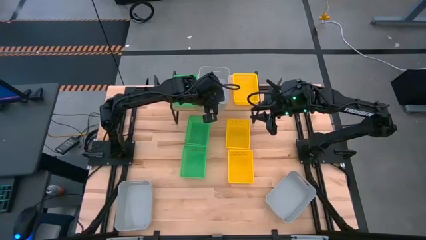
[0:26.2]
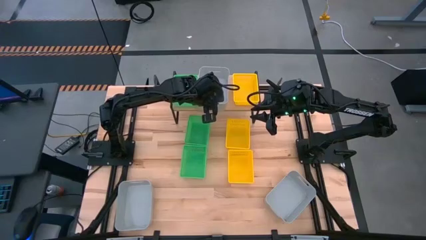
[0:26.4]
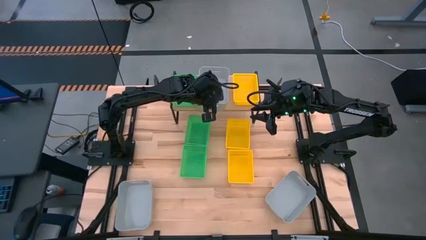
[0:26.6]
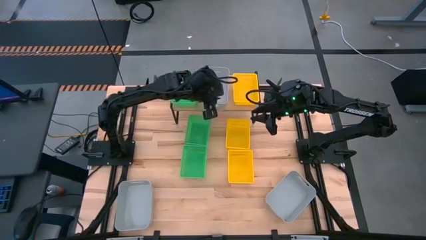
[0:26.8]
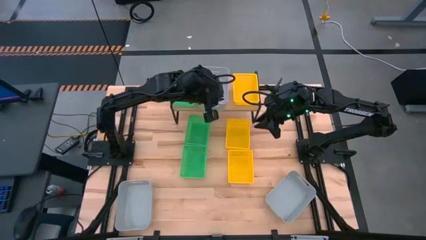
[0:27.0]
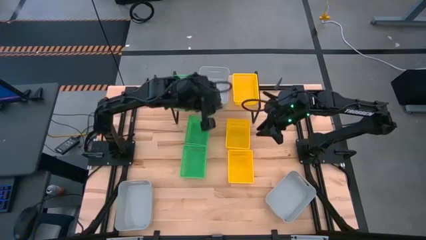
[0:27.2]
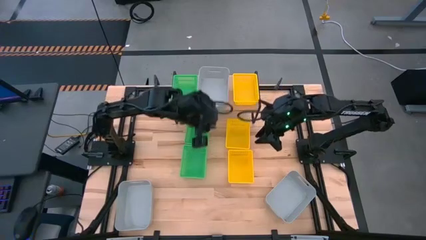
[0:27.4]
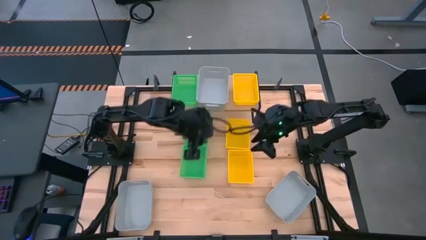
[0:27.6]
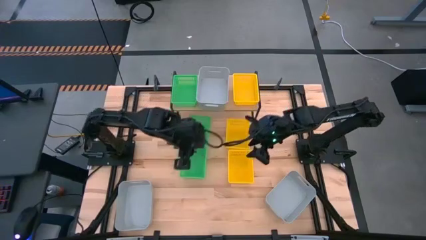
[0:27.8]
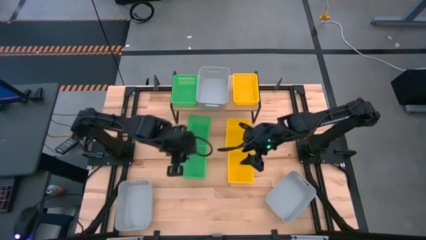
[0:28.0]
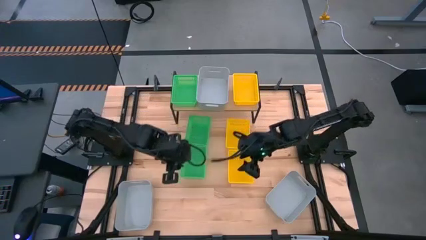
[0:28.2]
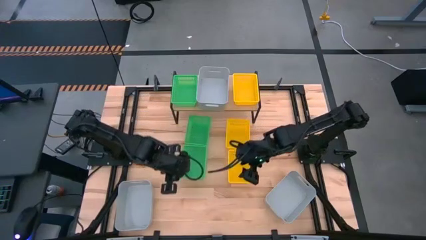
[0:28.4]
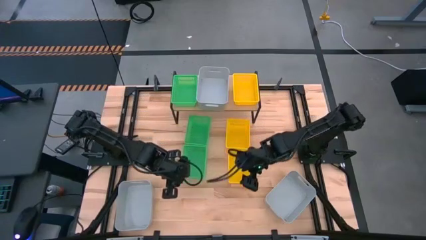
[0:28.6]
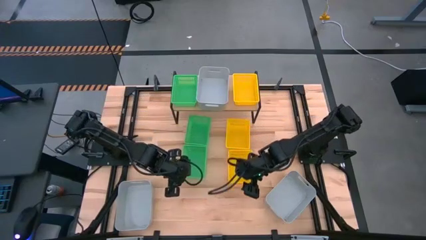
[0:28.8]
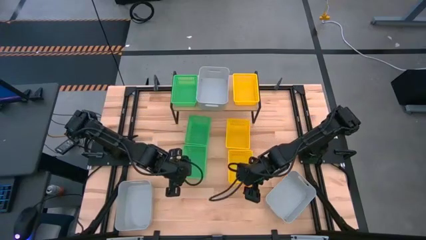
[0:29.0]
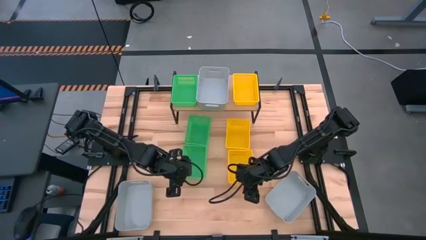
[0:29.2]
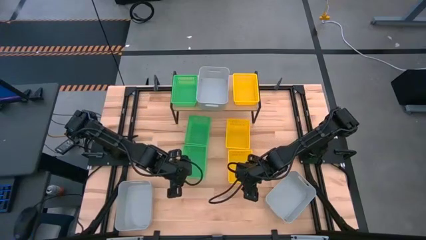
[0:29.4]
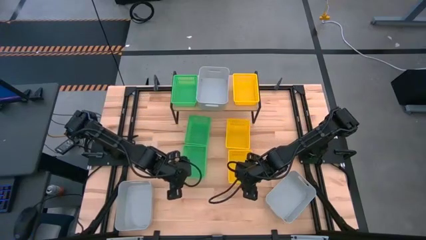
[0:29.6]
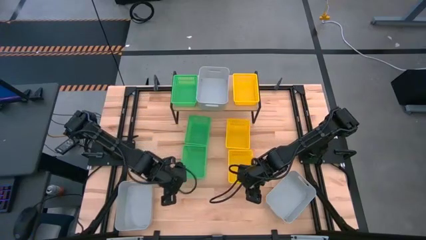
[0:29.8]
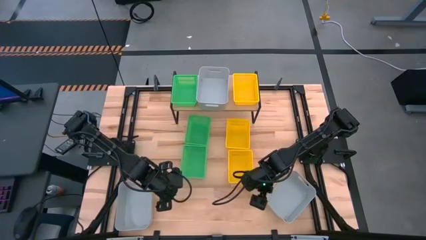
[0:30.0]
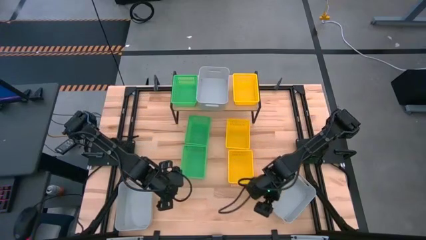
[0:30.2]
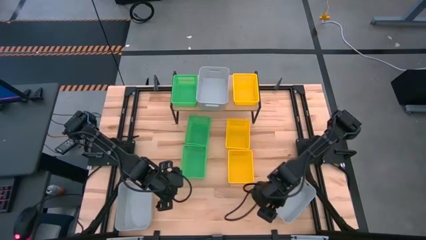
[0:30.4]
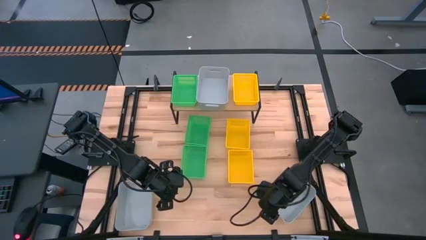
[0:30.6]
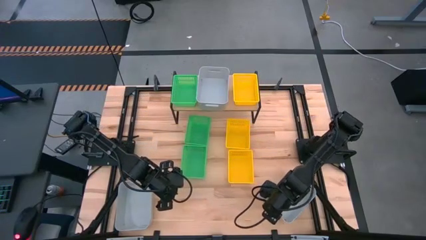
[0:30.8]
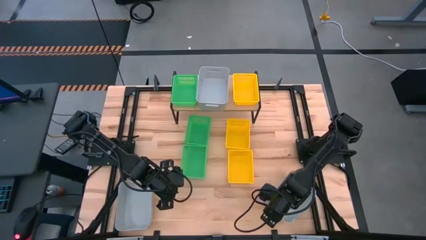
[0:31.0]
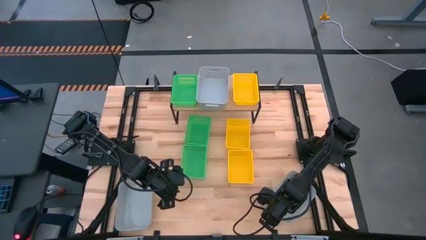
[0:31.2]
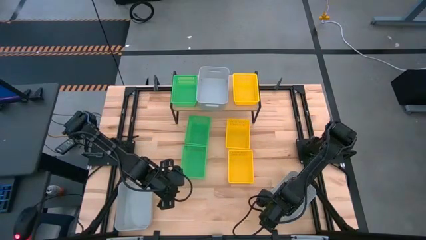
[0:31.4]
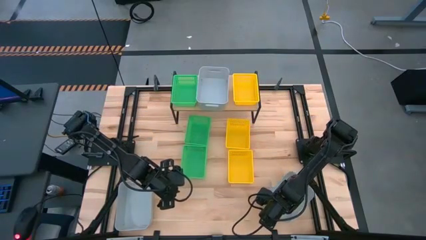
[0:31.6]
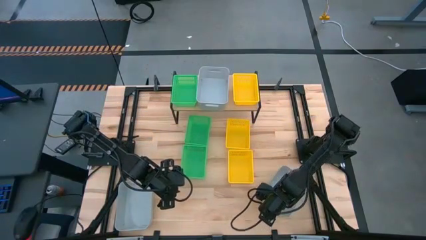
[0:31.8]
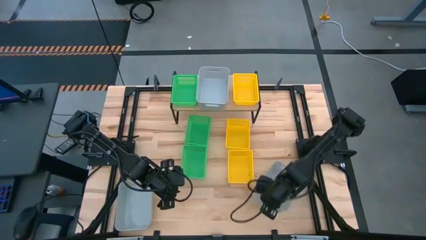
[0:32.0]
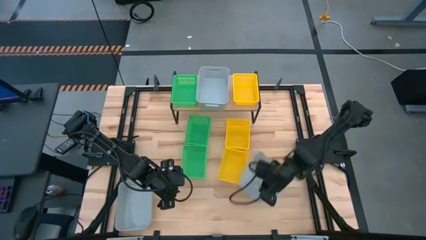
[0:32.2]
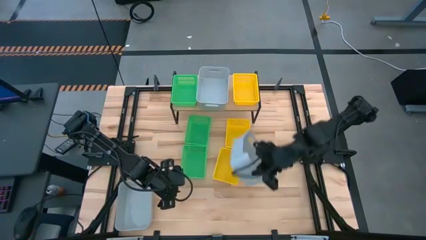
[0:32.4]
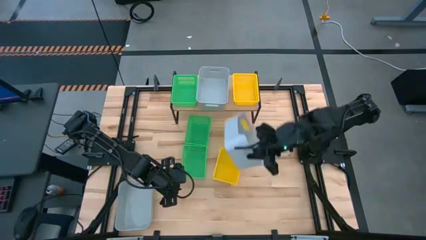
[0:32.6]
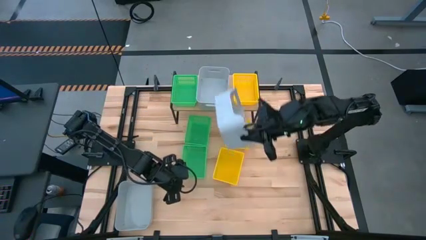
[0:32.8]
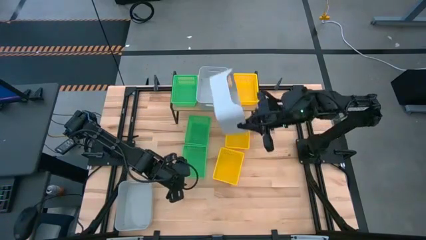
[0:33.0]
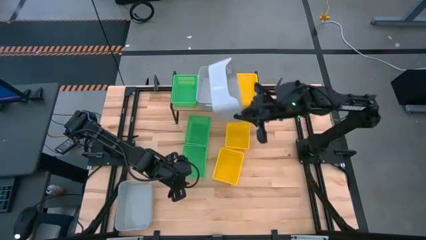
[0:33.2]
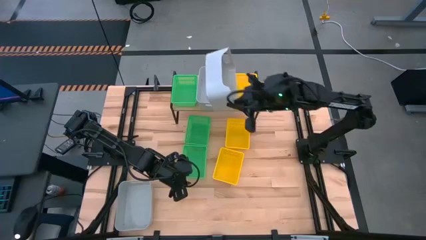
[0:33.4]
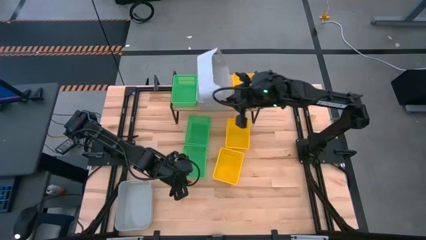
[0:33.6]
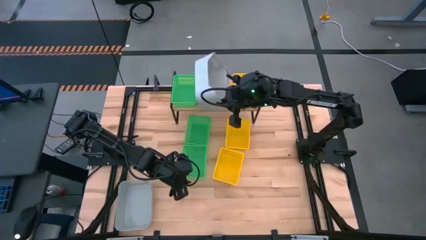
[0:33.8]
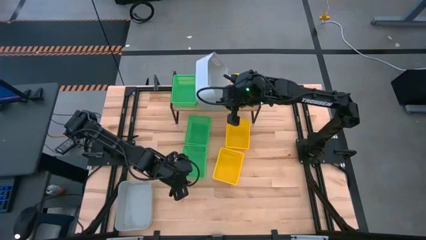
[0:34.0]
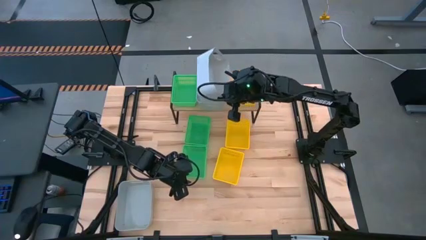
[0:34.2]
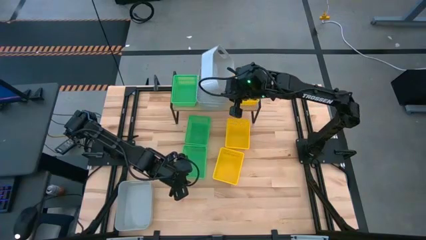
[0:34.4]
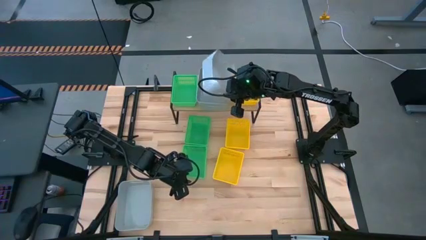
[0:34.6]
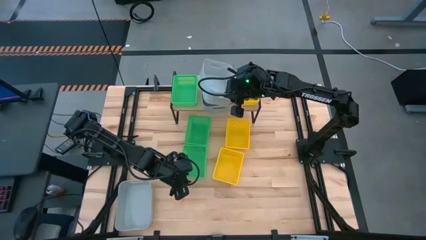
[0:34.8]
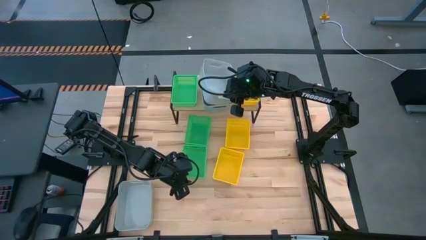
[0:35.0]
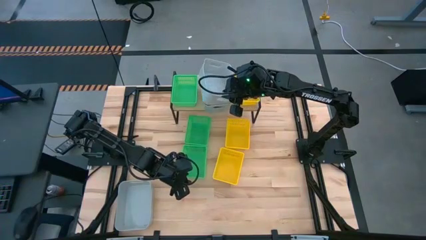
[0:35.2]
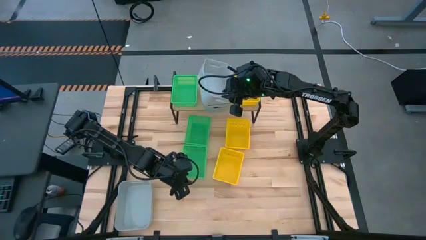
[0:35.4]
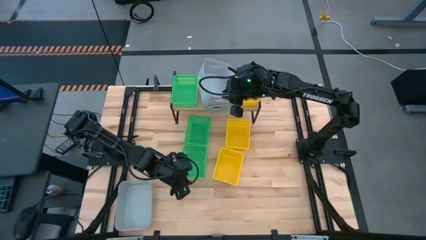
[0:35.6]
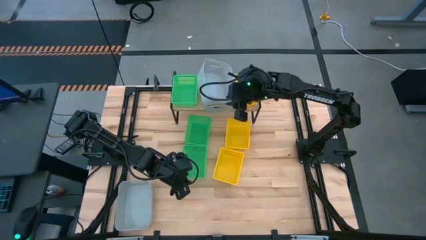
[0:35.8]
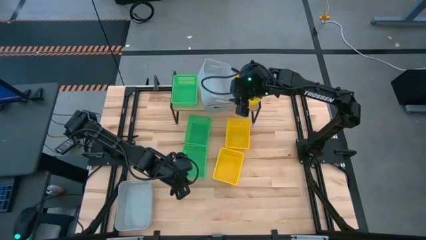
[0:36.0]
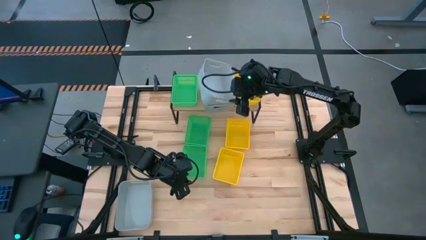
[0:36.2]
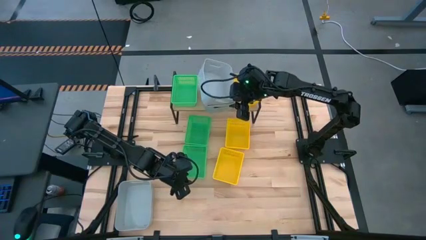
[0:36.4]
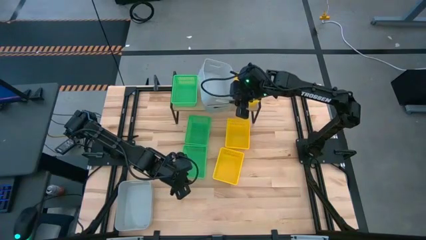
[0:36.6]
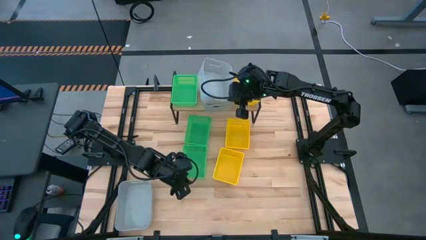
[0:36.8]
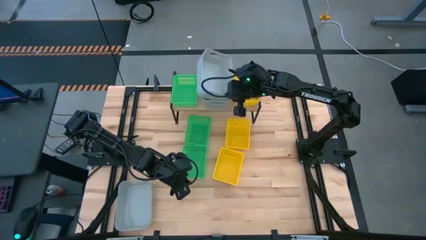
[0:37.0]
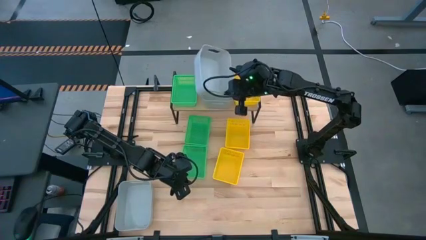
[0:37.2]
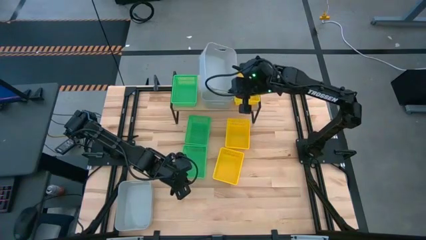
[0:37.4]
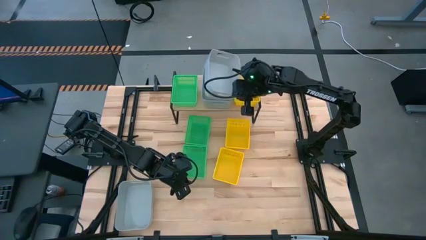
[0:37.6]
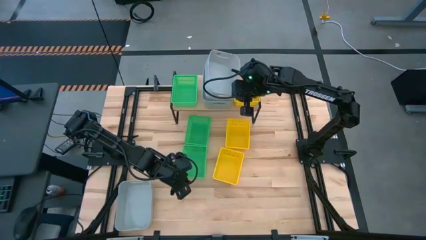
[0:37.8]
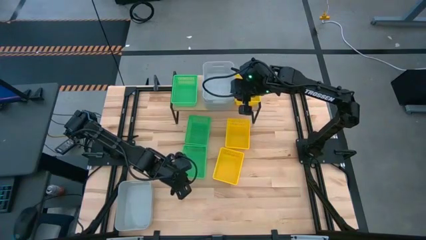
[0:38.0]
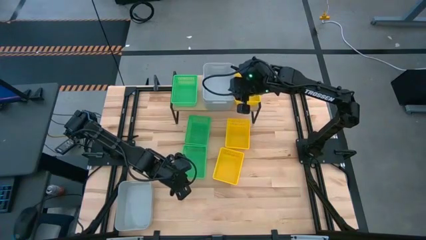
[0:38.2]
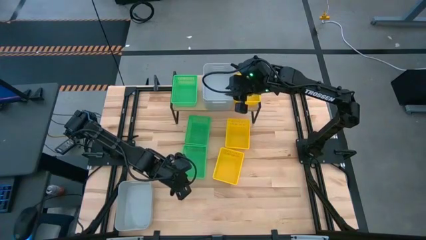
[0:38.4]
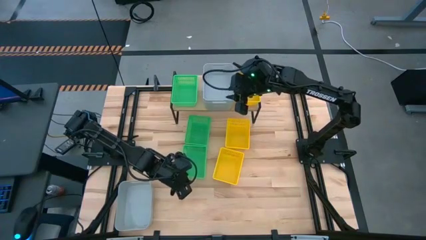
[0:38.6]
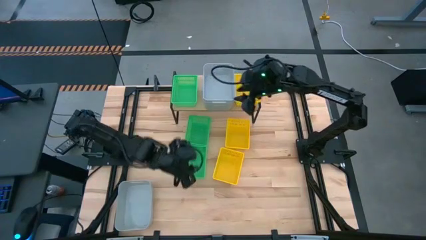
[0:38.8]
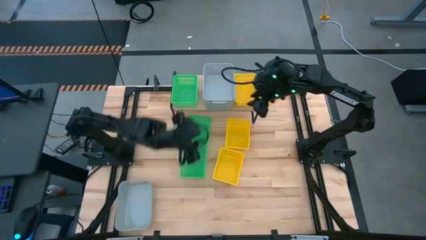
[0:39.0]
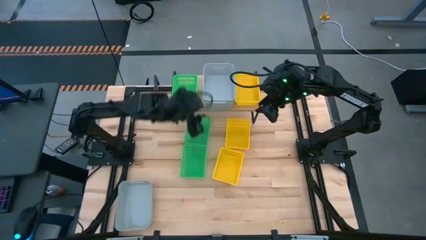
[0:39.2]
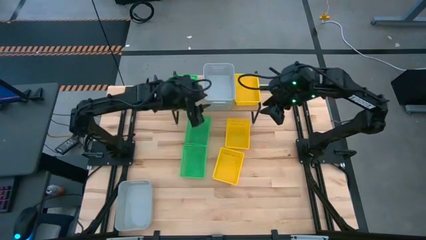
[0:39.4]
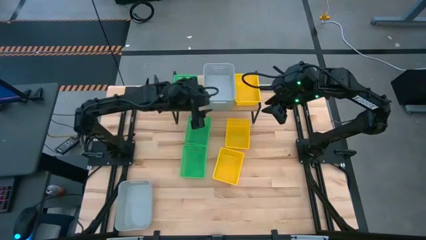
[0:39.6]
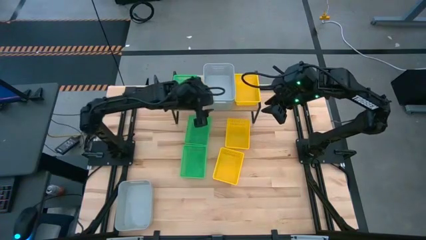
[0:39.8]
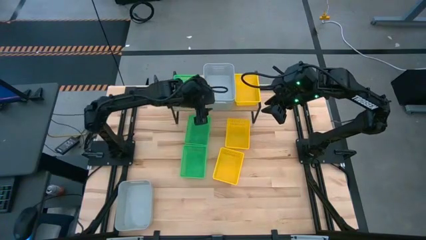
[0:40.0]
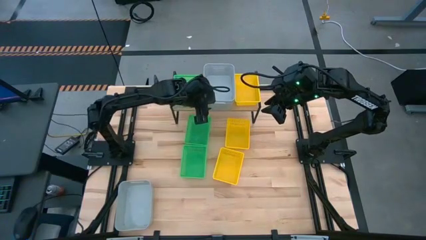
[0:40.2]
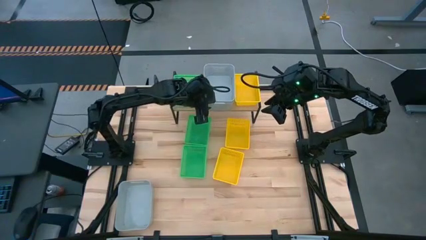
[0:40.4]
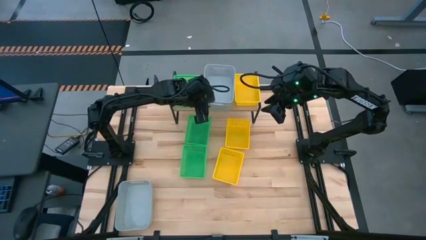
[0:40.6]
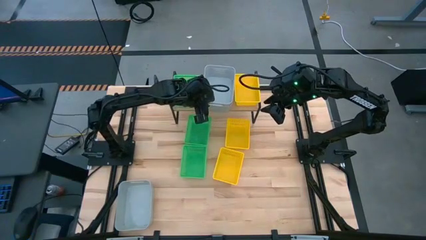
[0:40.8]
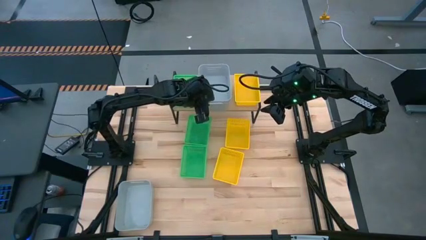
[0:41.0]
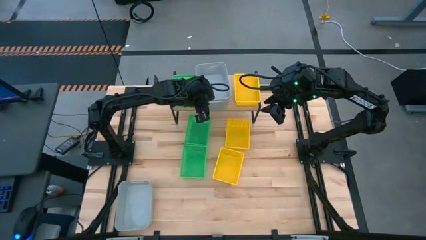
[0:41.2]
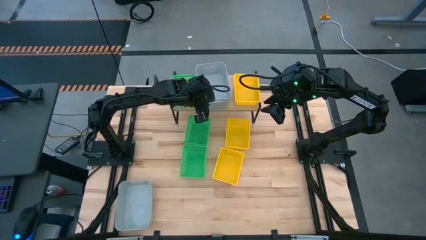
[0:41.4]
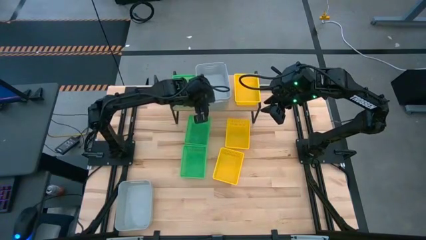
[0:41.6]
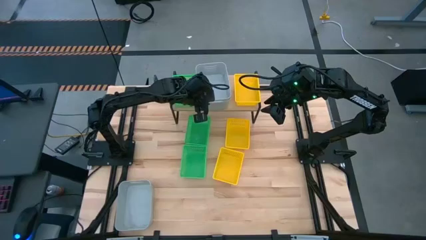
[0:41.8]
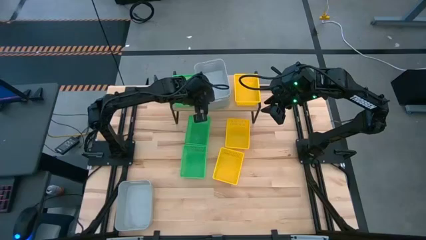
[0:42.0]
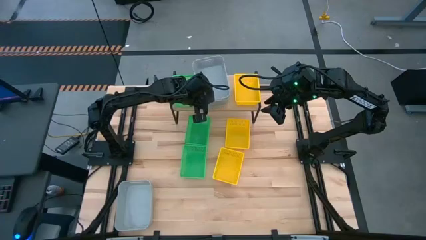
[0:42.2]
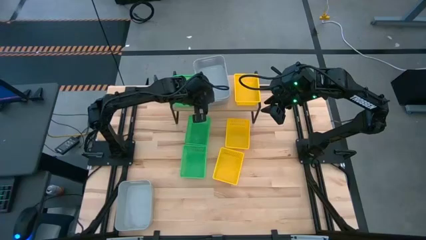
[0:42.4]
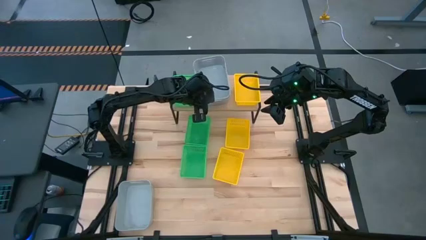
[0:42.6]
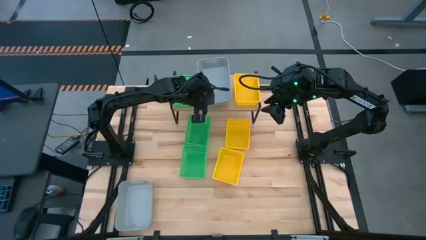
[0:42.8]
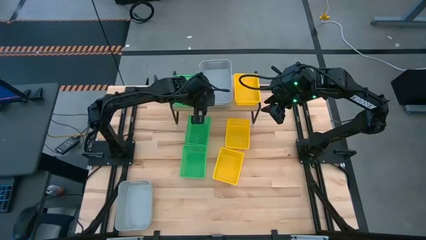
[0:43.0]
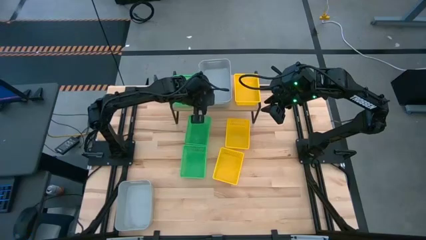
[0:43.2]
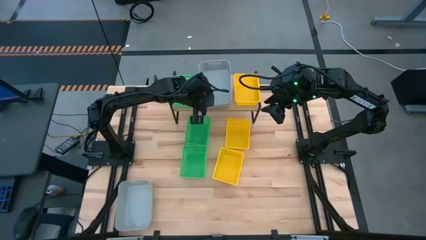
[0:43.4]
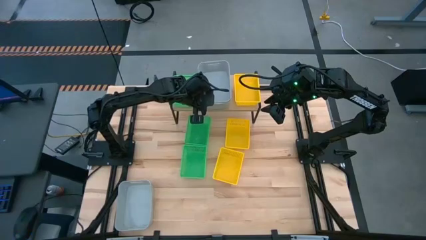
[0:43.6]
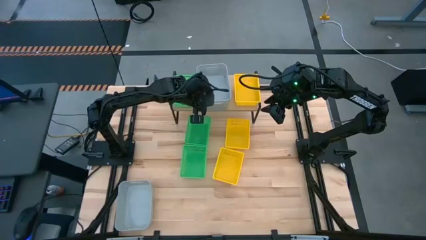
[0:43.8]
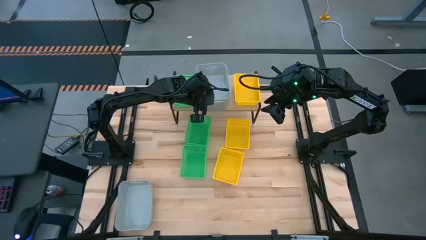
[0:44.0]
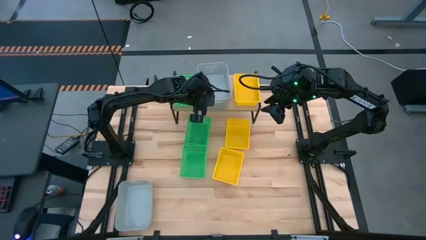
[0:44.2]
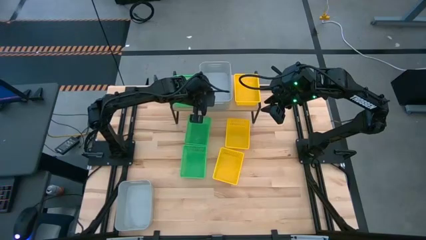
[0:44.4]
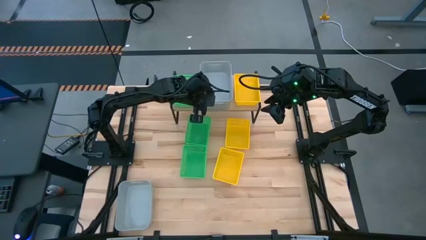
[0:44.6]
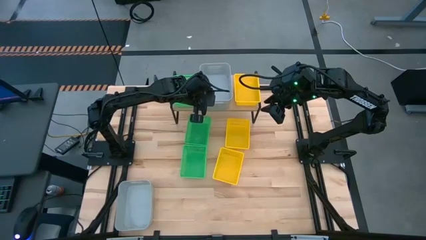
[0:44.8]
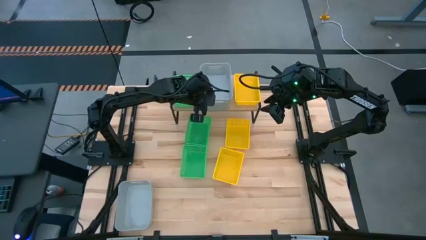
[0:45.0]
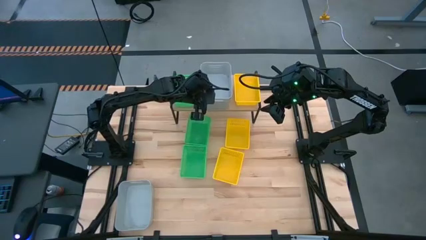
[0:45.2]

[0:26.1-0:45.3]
Task: Stack baskets on shelf by color
Stack the right gray bin on top of the gray bin on the shelf
